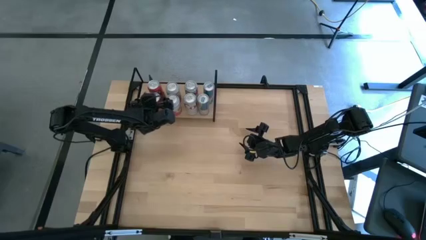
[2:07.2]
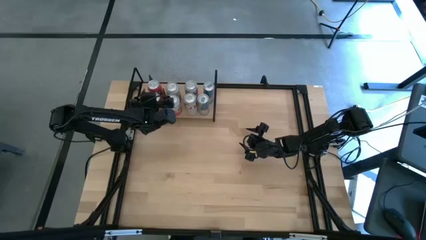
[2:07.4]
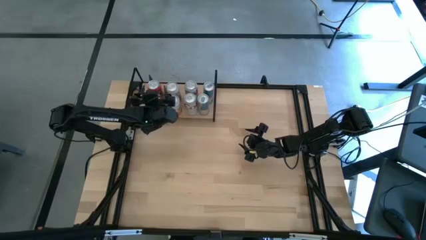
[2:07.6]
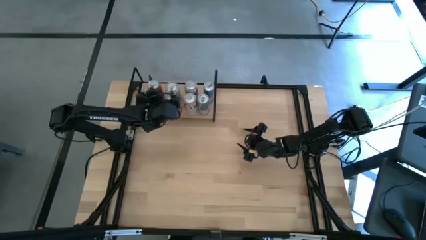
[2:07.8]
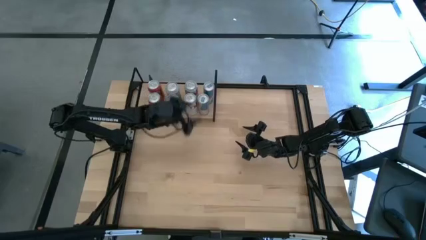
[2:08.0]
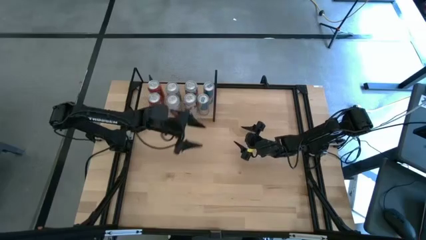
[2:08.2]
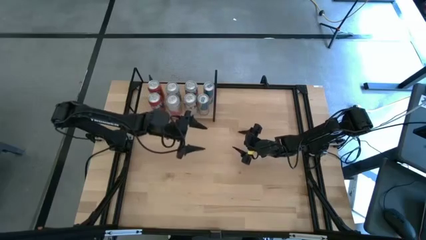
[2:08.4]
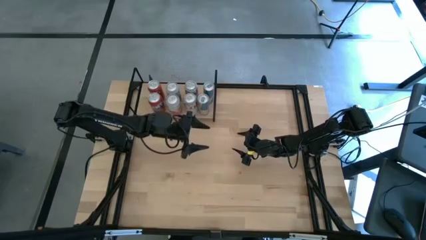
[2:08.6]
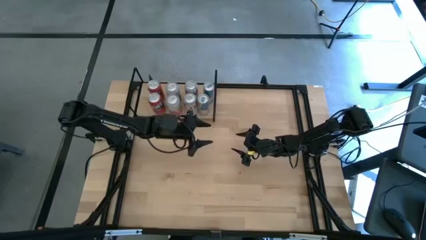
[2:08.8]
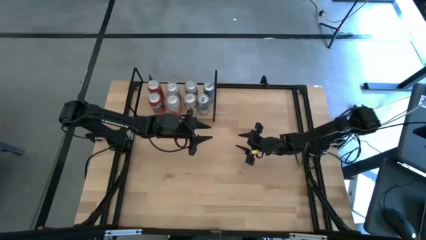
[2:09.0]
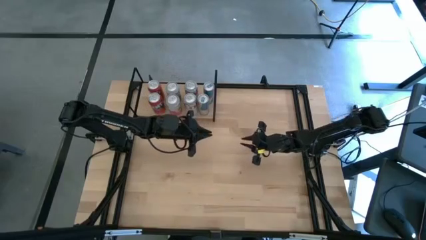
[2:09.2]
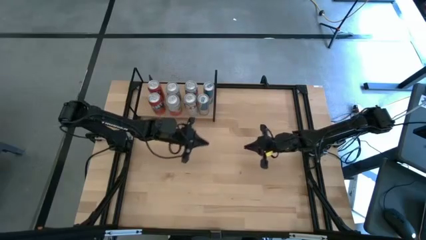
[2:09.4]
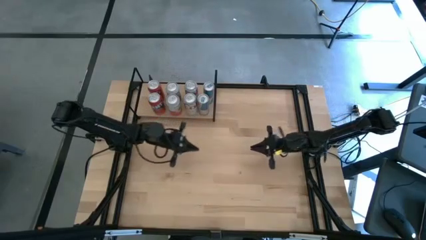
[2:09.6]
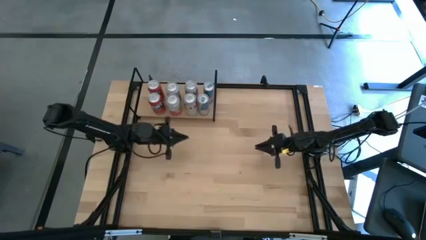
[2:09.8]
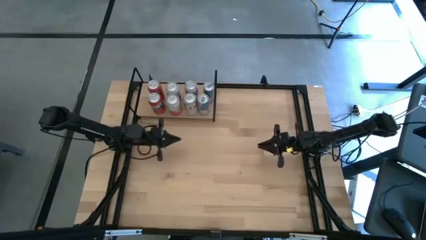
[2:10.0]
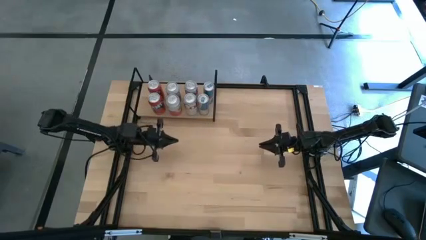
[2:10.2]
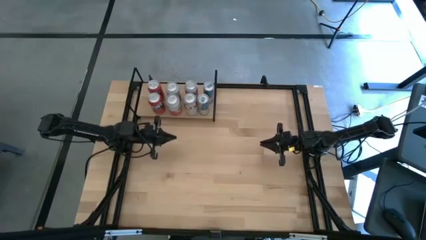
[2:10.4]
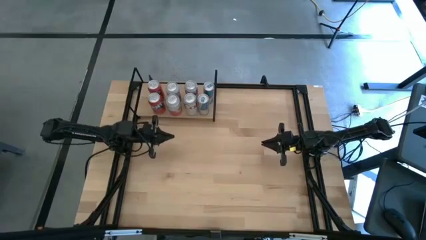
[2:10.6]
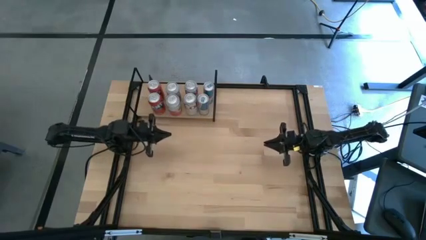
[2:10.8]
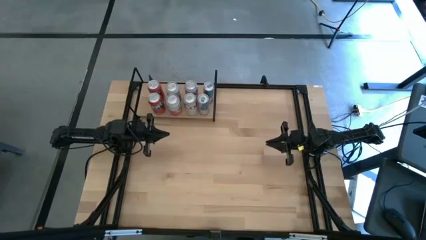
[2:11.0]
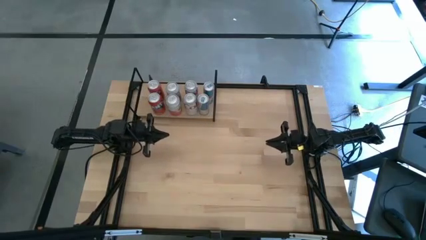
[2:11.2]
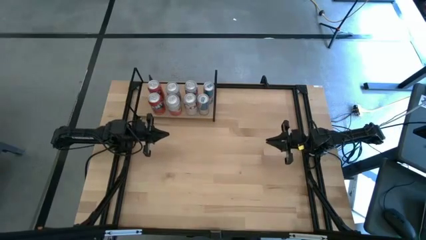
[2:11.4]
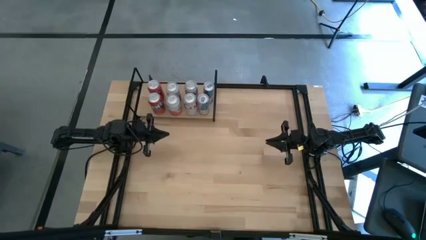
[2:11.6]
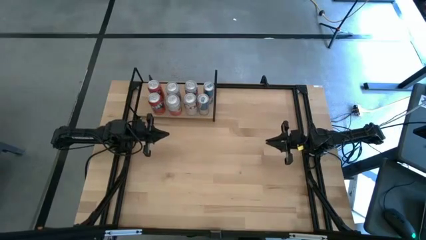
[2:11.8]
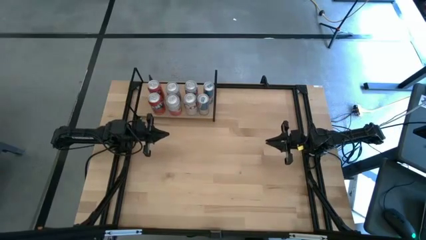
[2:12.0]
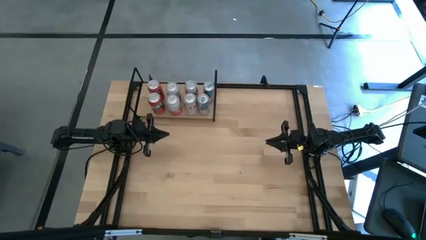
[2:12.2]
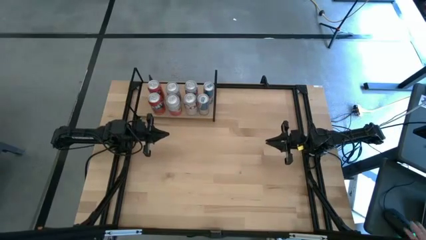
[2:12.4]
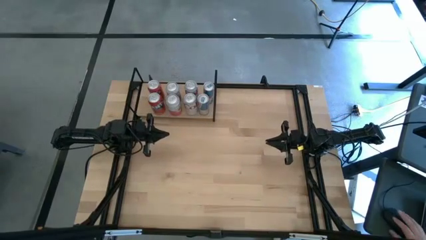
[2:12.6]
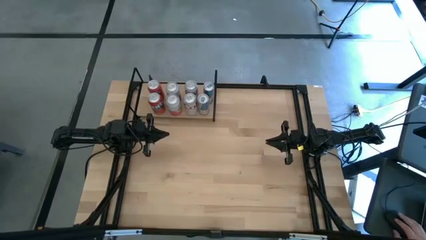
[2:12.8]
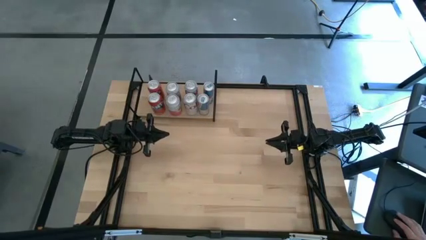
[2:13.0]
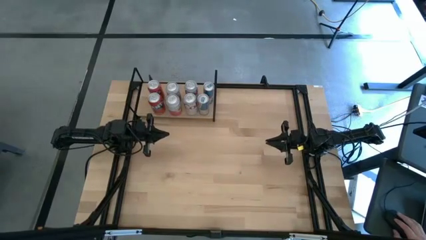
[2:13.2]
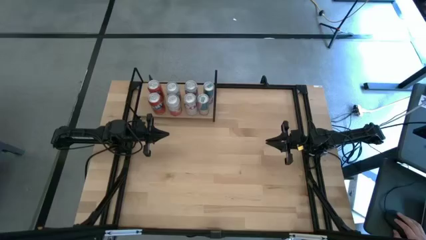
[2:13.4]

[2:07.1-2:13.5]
Task: Place canned beverage on shelf
Return to Home Position

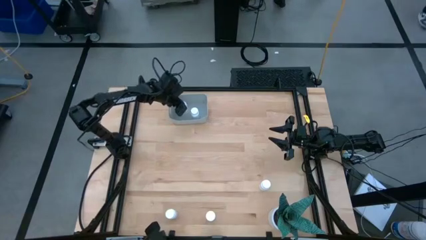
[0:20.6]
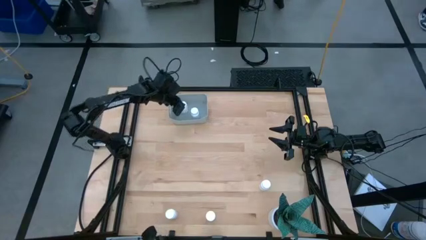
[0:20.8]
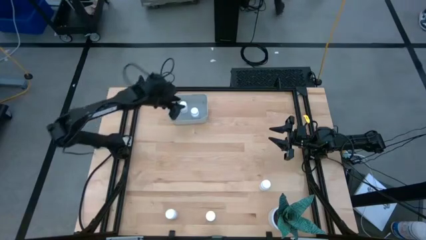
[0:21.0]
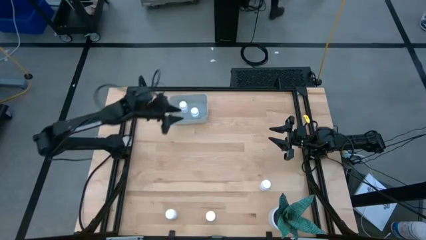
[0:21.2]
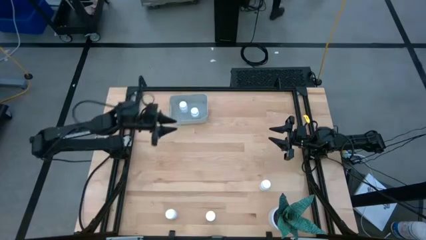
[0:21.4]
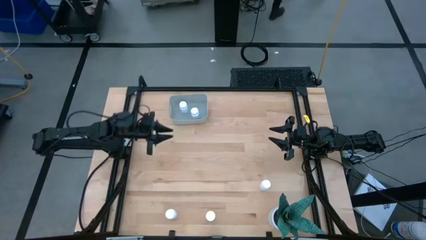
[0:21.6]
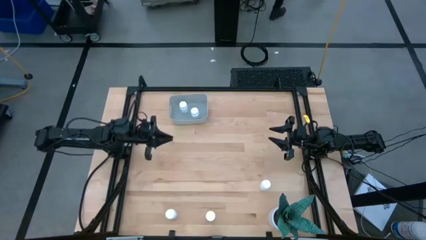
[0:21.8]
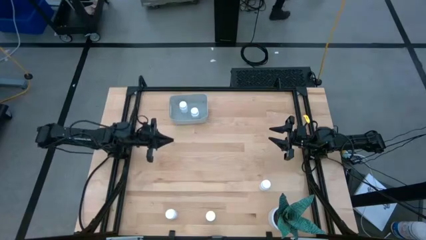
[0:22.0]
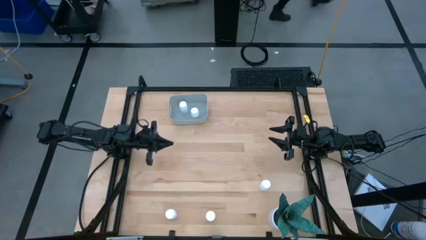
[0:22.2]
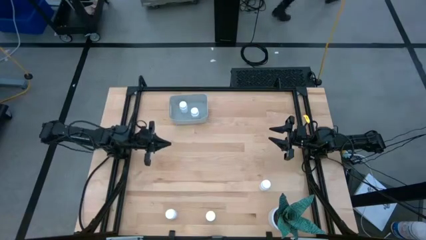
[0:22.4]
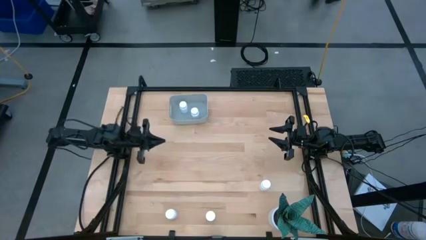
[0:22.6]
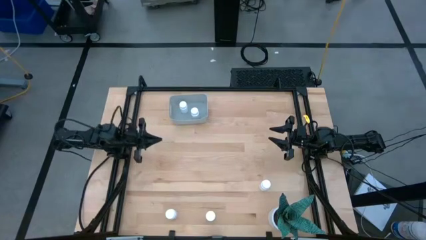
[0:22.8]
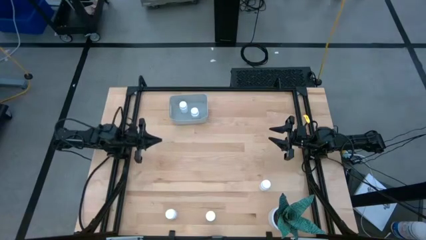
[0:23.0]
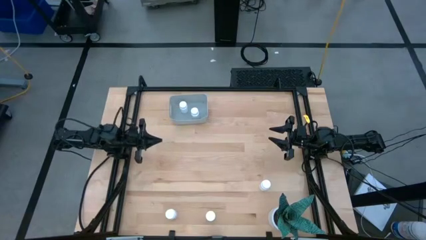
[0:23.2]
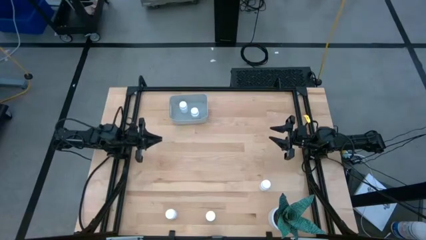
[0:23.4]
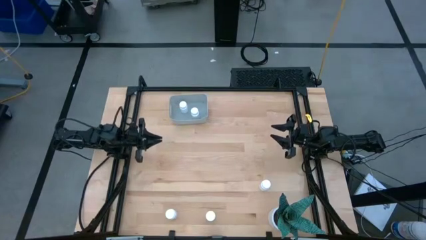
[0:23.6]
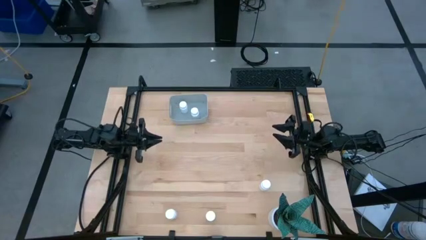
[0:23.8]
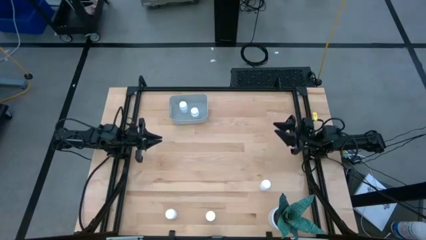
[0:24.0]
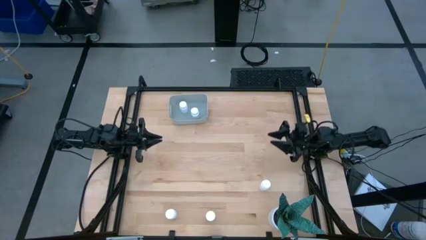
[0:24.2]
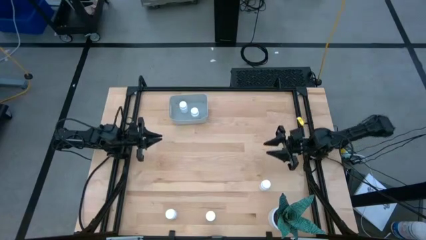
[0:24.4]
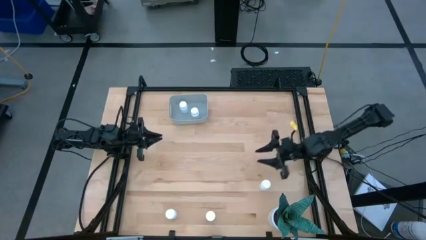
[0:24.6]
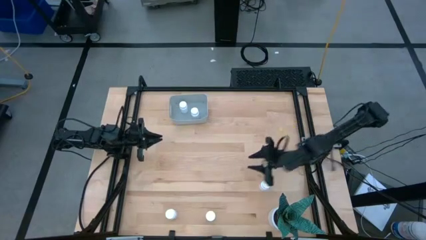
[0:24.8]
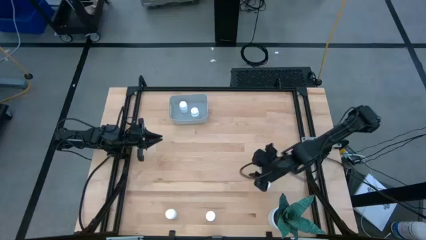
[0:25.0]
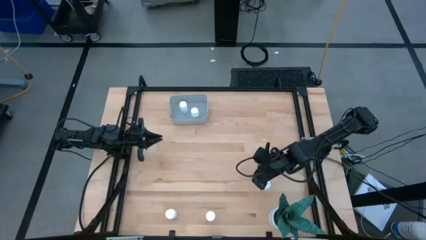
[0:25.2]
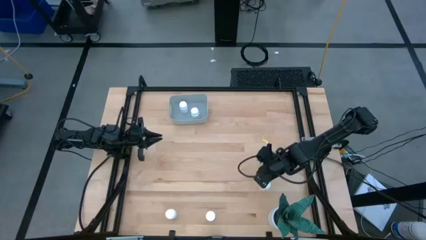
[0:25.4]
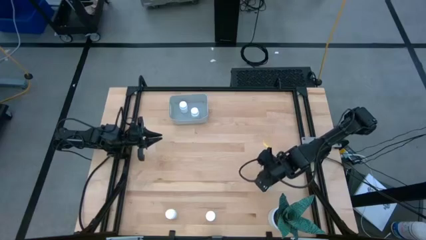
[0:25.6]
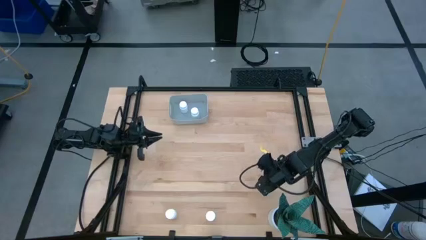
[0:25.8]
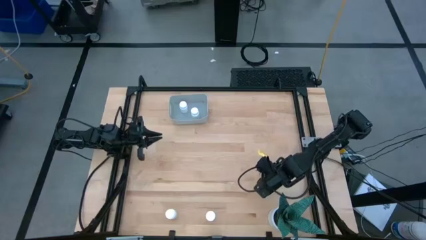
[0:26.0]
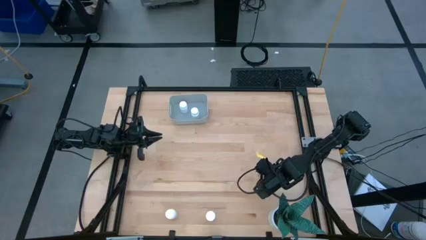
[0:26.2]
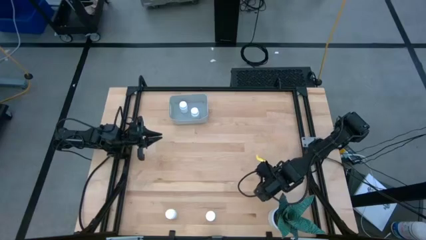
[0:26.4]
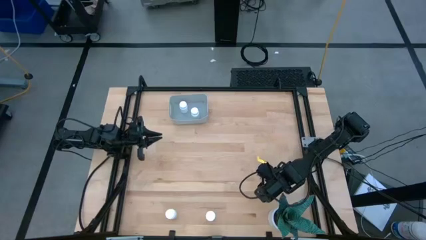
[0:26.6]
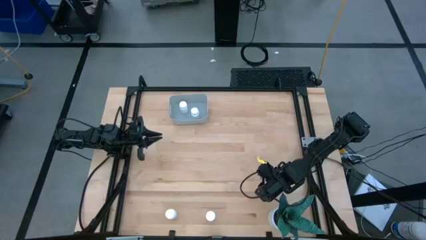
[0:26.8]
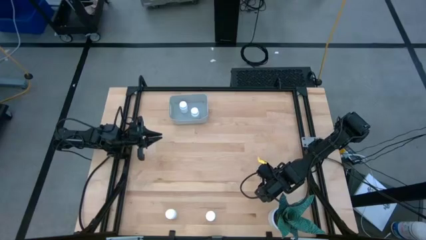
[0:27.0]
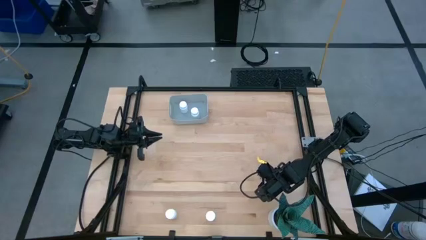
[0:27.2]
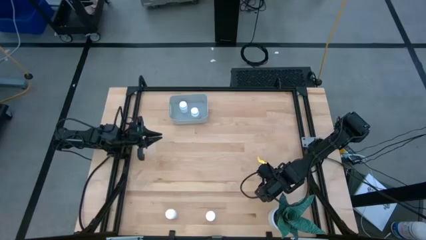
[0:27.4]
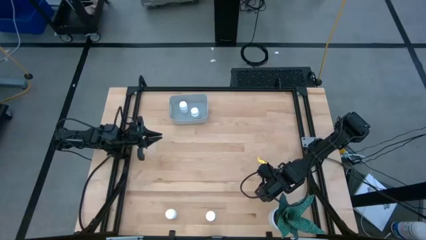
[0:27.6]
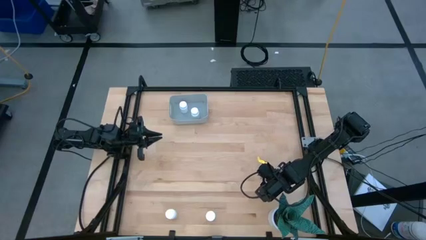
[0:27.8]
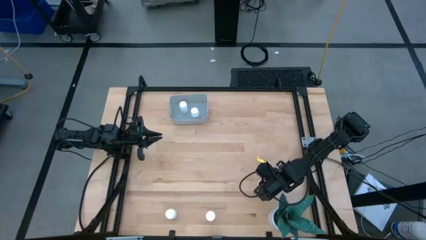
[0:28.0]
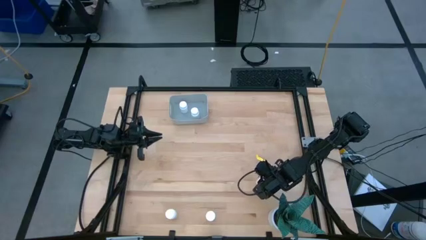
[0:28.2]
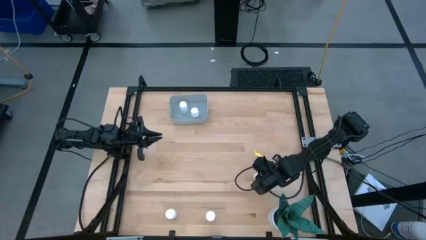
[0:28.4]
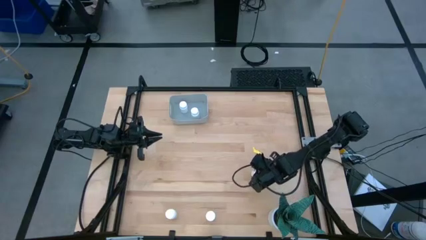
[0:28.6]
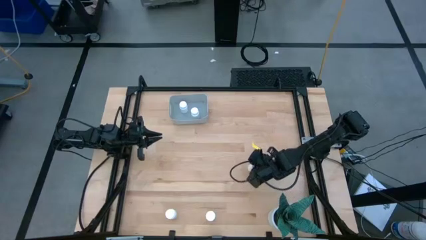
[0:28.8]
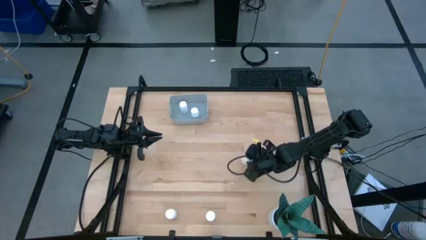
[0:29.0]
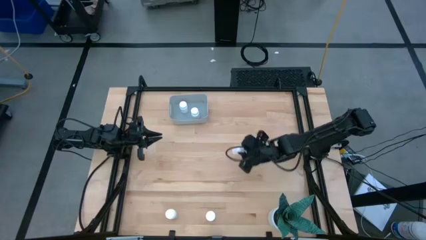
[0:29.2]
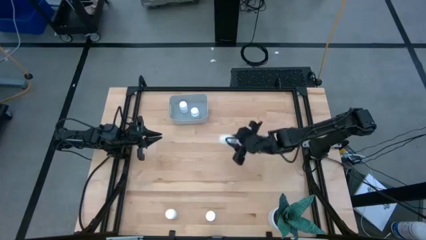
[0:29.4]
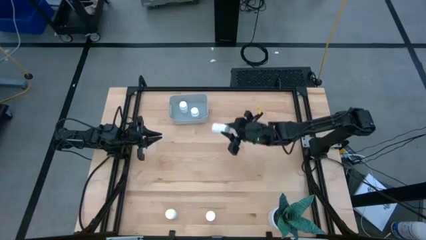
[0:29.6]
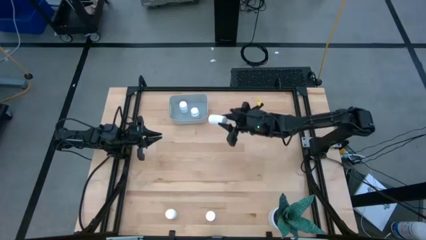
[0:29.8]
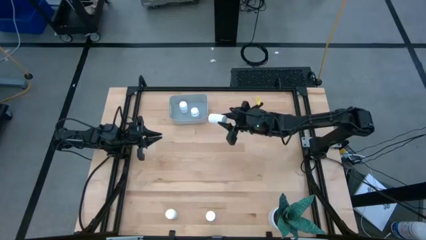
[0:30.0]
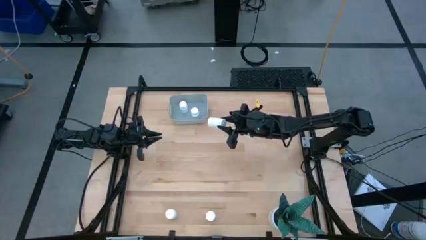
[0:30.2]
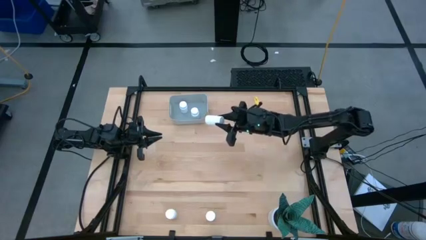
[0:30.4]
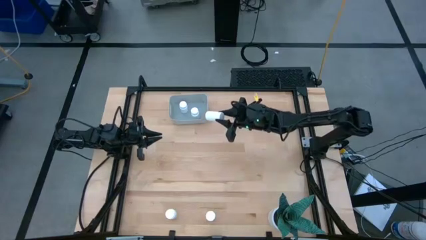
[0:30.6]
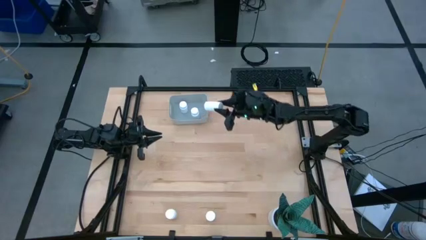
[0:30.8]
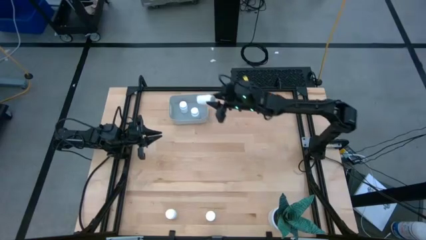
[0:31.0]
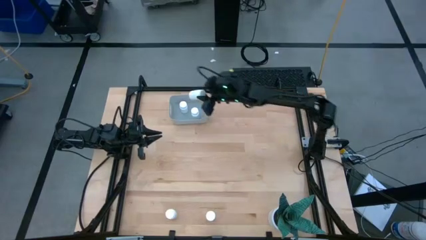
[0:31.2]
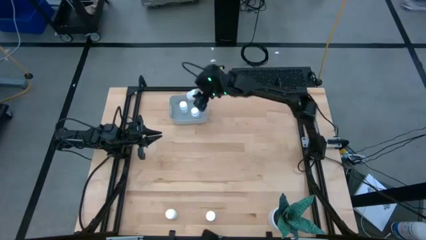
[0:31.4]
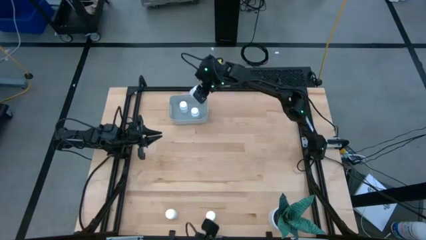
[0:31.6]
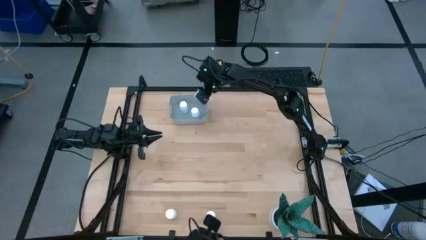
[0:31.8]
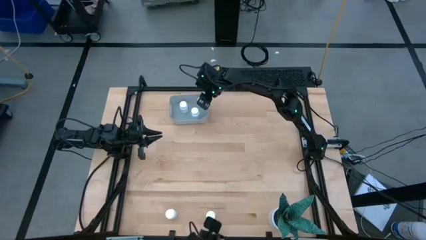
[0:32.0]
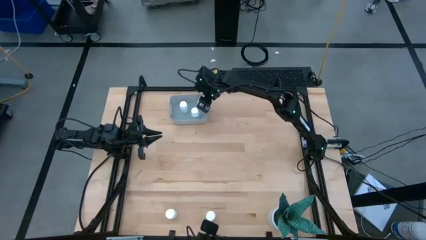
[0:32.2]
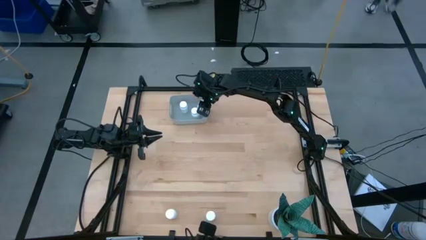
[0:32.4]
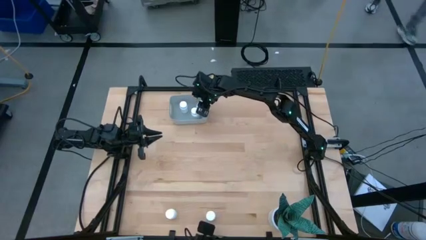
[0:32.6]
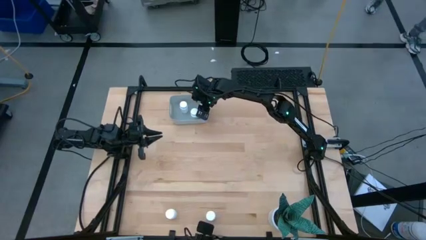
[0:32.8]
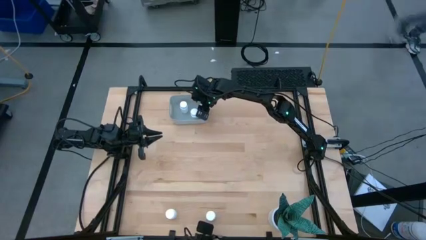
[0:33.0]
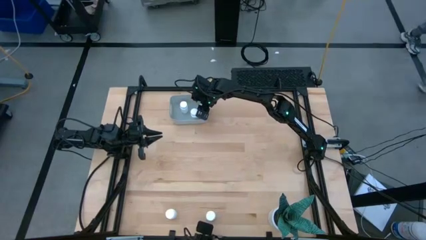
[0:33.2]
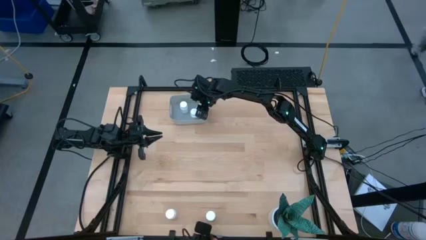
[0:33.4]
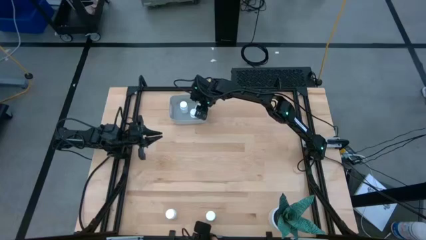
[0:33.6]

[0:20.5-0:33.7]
Task: Pick and place pill bottles into a basket
Put the white medicine bottle into the gray bin
